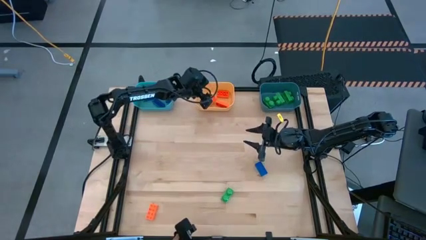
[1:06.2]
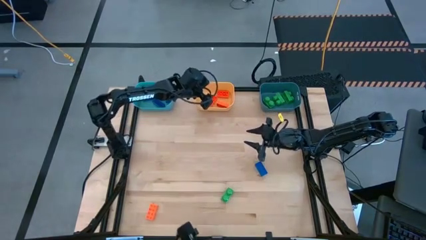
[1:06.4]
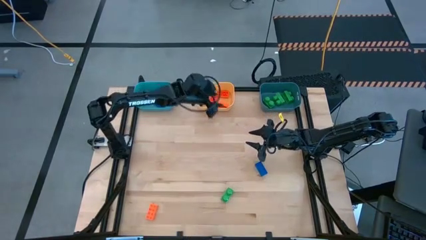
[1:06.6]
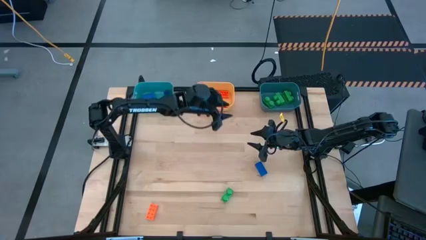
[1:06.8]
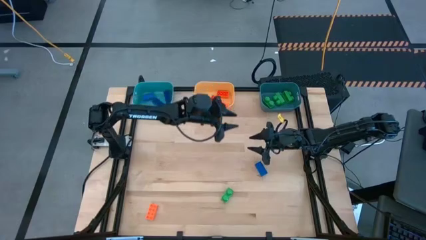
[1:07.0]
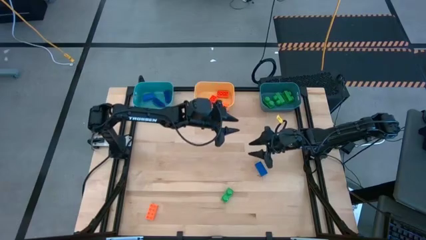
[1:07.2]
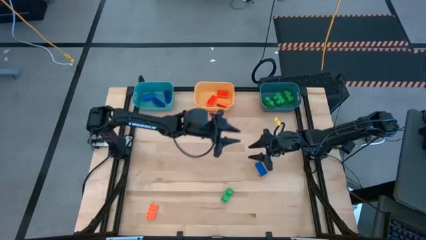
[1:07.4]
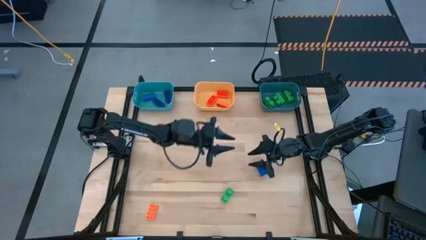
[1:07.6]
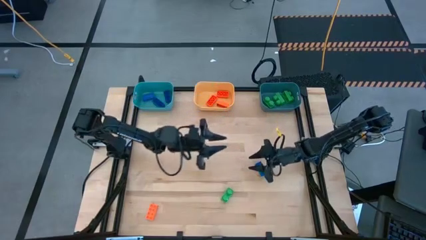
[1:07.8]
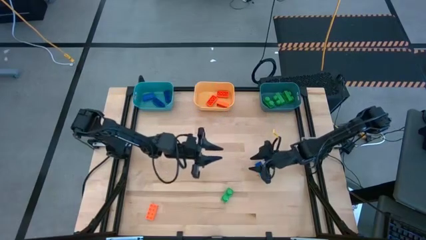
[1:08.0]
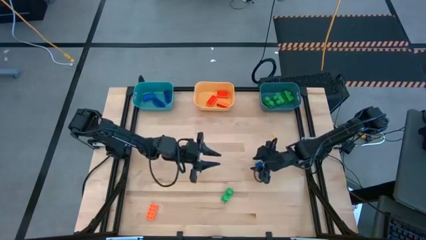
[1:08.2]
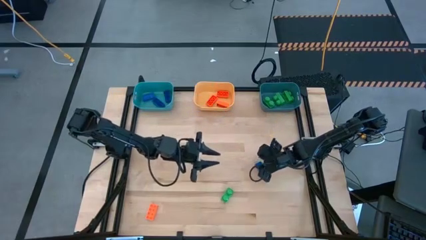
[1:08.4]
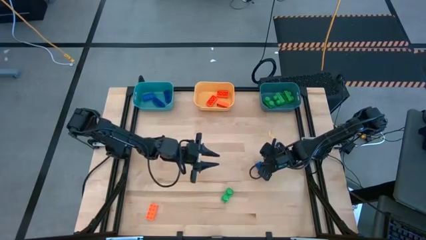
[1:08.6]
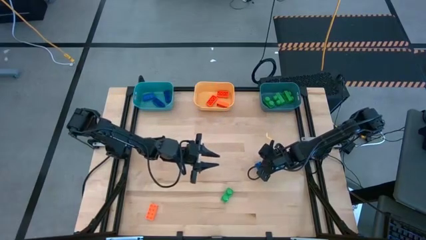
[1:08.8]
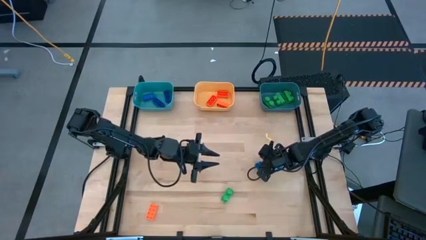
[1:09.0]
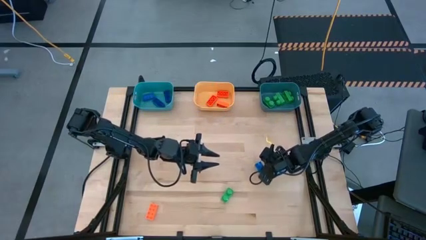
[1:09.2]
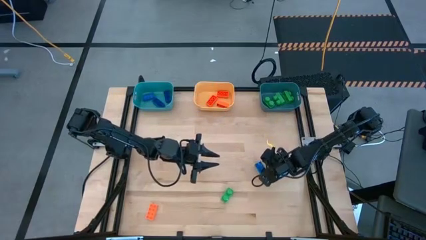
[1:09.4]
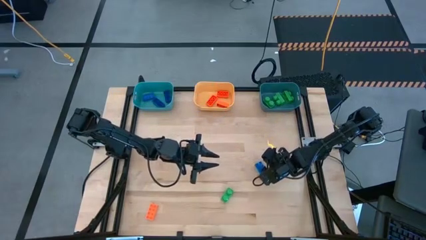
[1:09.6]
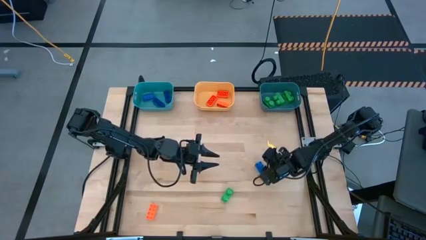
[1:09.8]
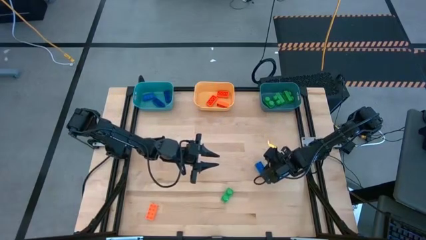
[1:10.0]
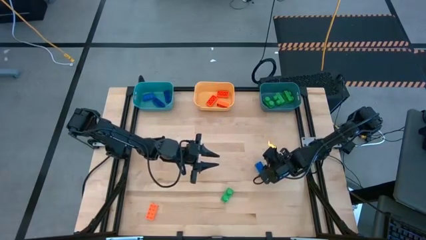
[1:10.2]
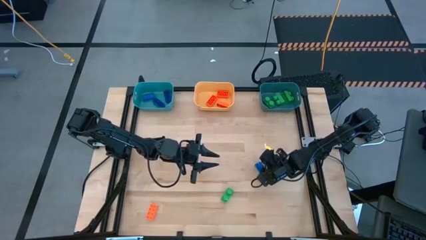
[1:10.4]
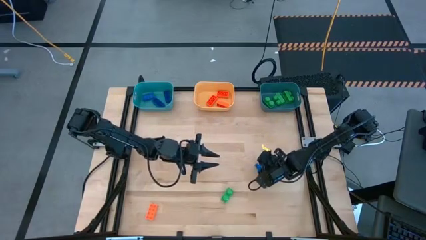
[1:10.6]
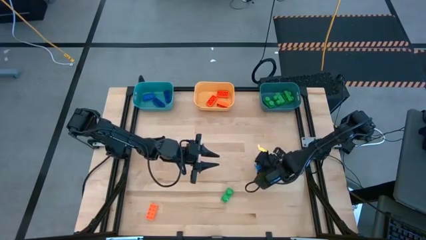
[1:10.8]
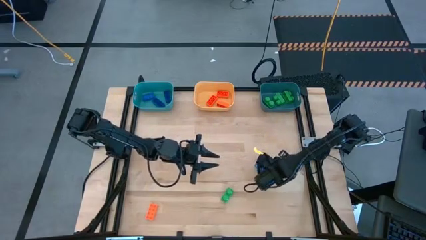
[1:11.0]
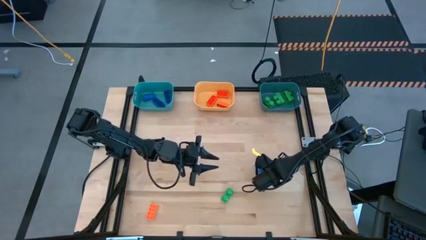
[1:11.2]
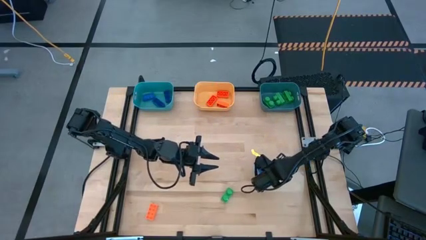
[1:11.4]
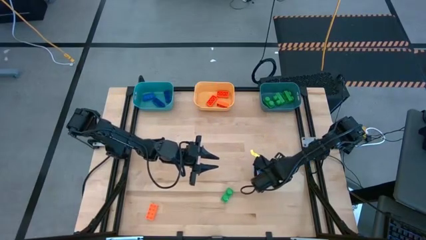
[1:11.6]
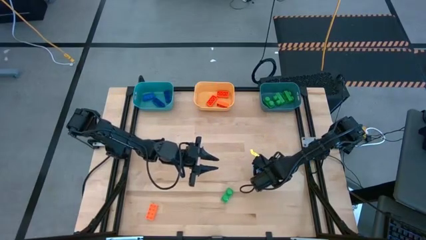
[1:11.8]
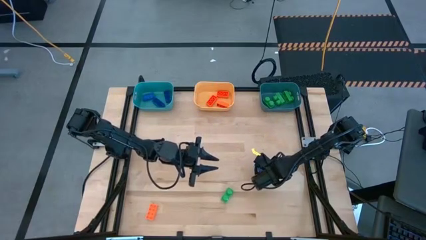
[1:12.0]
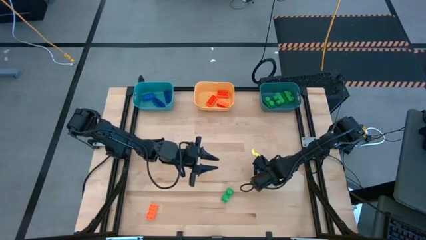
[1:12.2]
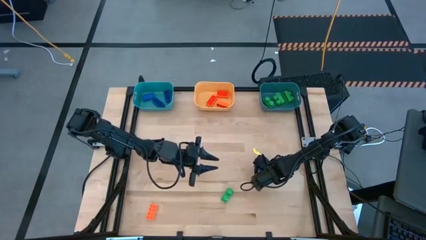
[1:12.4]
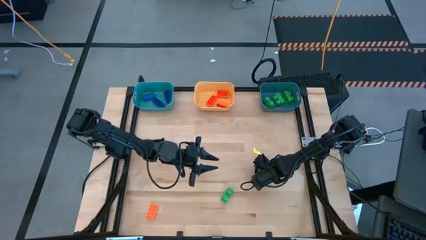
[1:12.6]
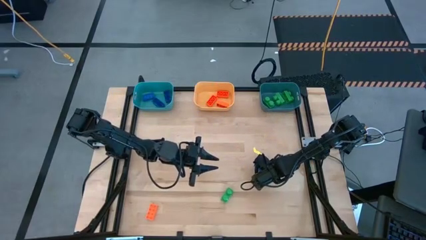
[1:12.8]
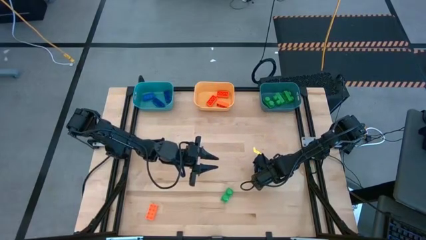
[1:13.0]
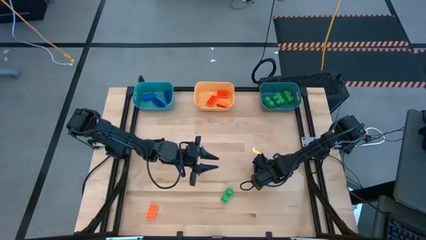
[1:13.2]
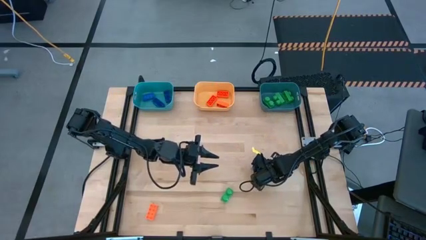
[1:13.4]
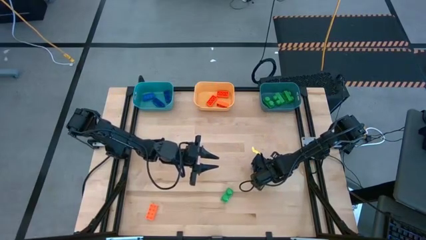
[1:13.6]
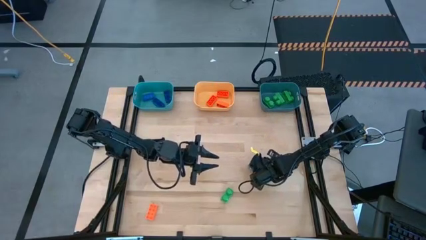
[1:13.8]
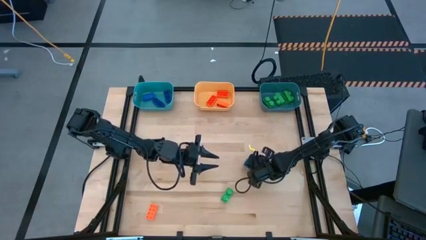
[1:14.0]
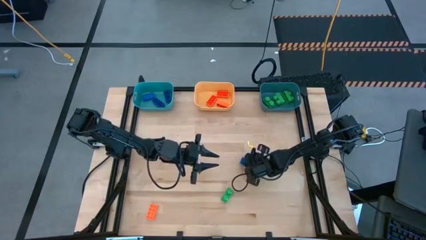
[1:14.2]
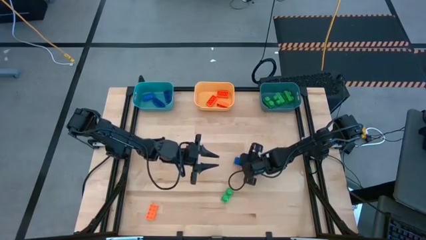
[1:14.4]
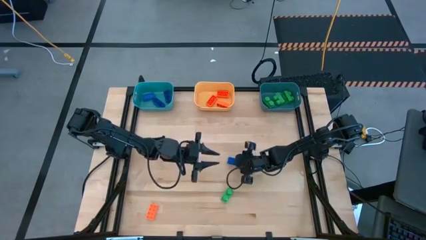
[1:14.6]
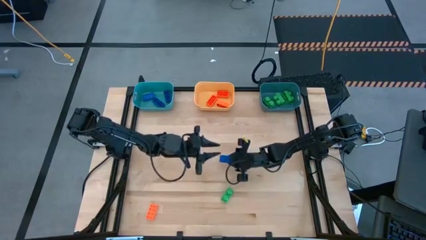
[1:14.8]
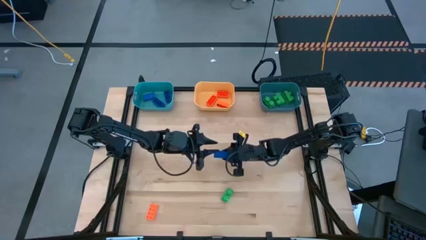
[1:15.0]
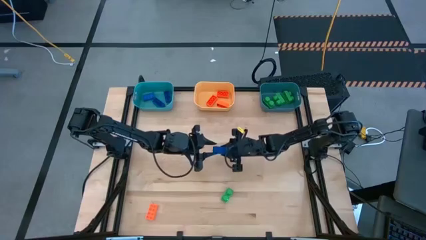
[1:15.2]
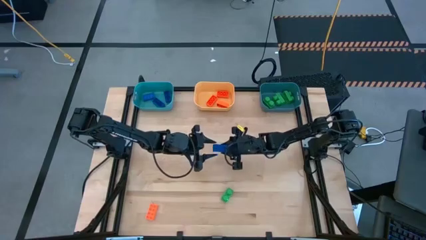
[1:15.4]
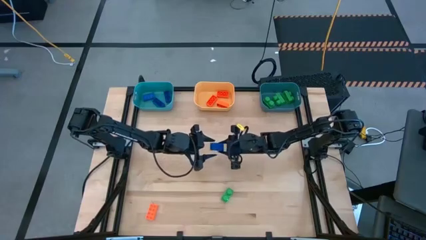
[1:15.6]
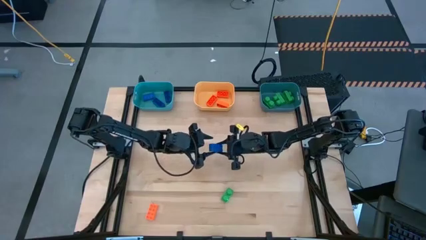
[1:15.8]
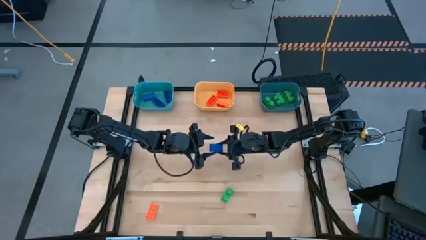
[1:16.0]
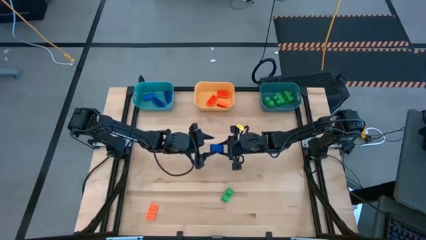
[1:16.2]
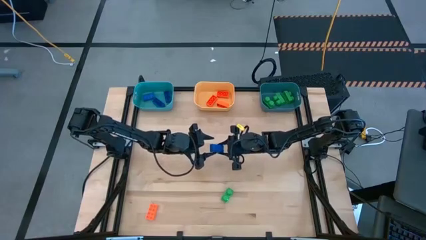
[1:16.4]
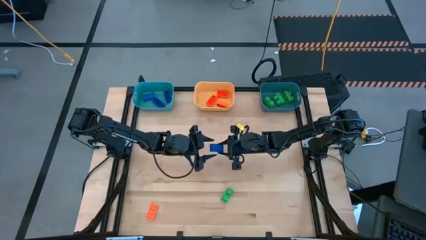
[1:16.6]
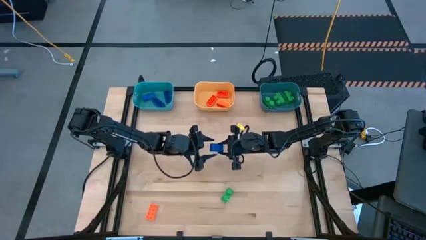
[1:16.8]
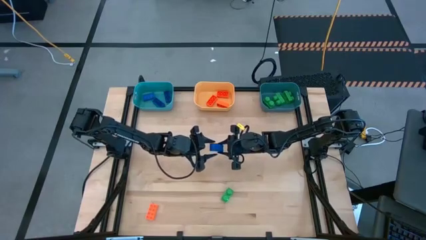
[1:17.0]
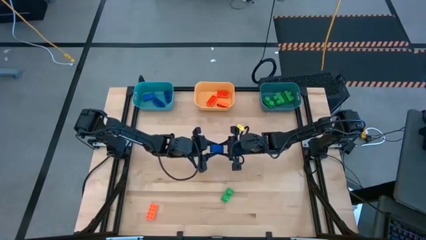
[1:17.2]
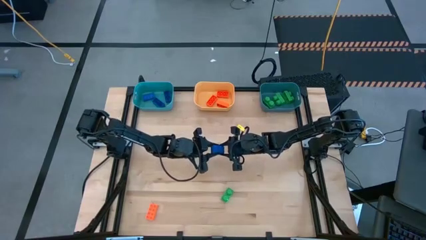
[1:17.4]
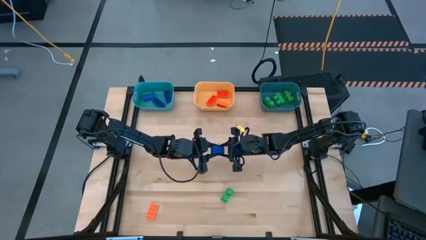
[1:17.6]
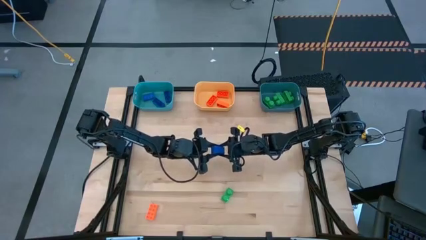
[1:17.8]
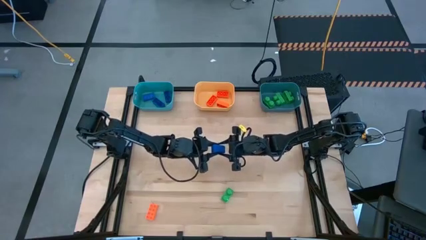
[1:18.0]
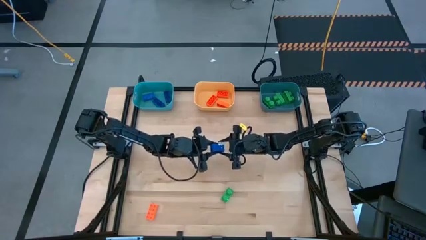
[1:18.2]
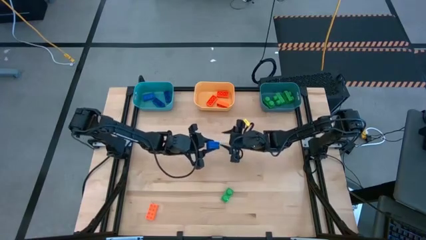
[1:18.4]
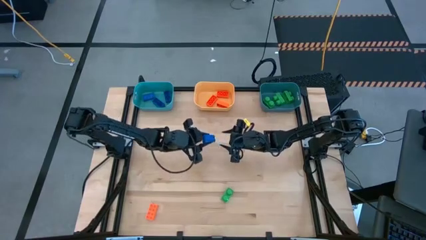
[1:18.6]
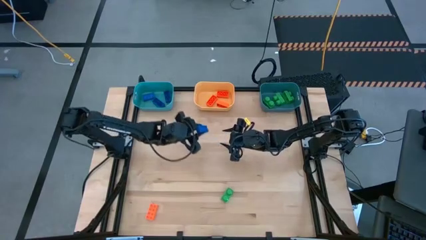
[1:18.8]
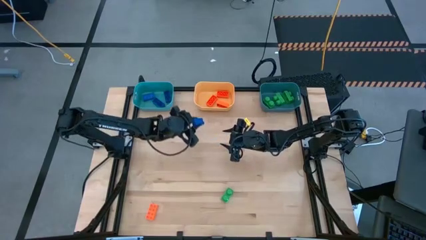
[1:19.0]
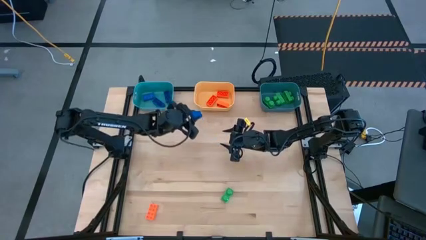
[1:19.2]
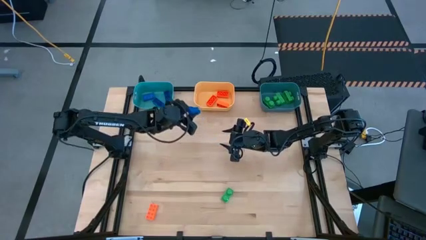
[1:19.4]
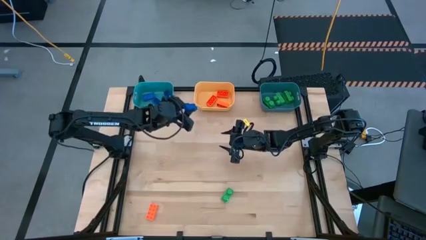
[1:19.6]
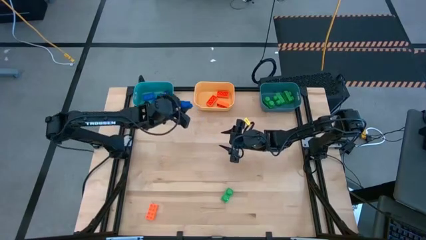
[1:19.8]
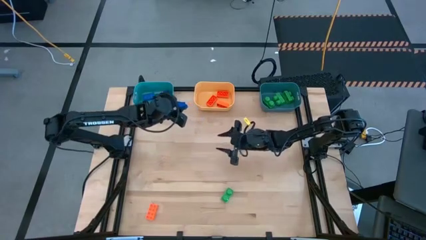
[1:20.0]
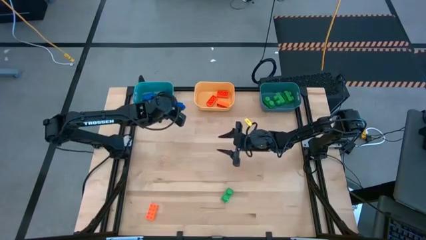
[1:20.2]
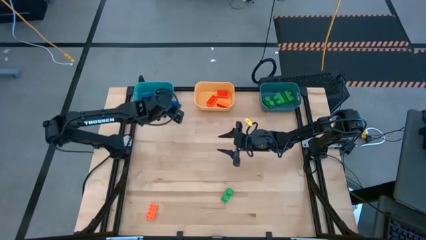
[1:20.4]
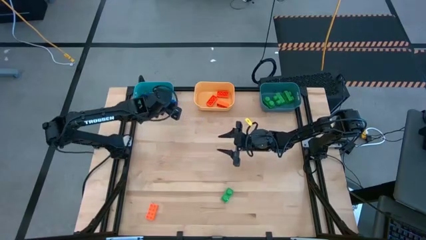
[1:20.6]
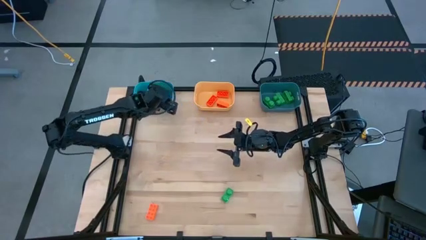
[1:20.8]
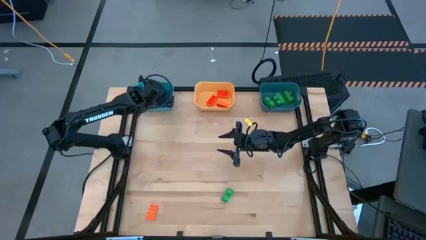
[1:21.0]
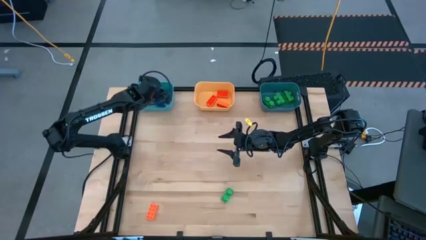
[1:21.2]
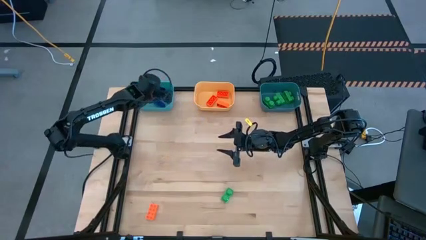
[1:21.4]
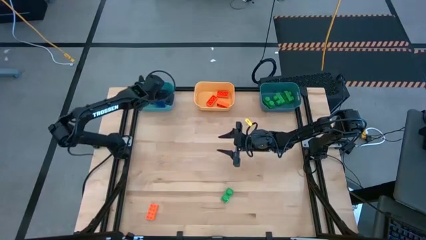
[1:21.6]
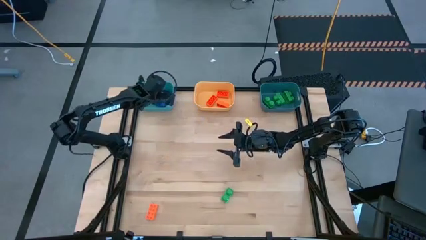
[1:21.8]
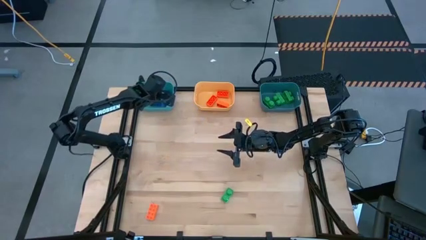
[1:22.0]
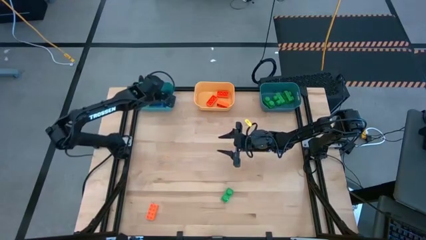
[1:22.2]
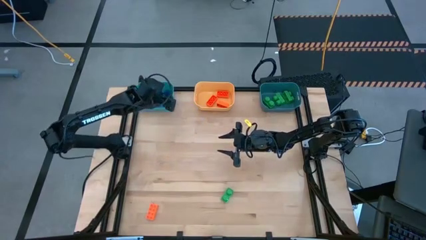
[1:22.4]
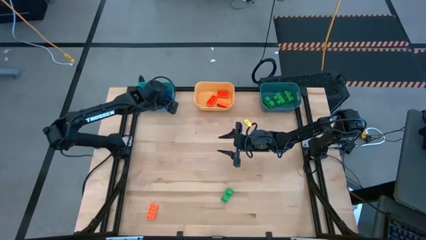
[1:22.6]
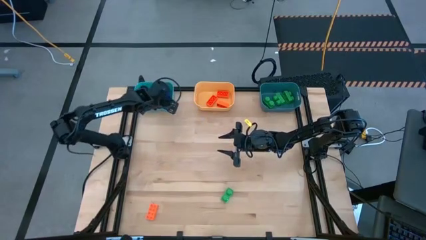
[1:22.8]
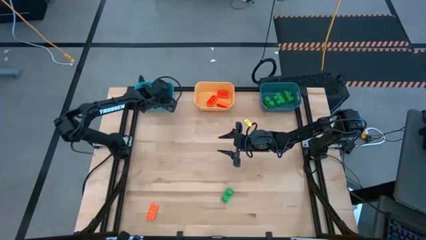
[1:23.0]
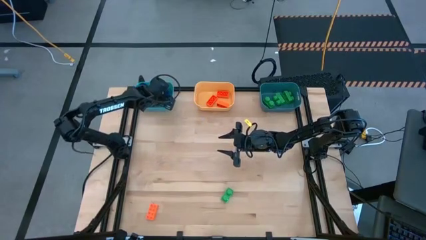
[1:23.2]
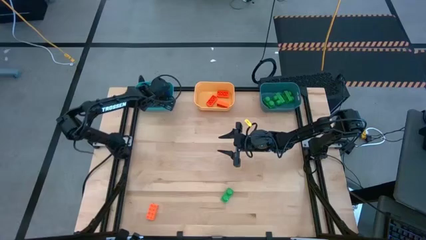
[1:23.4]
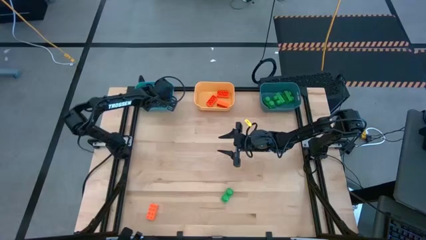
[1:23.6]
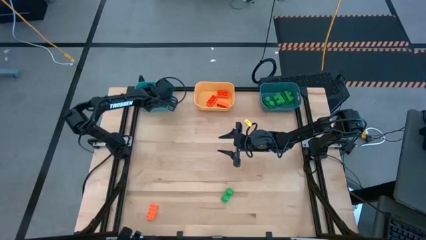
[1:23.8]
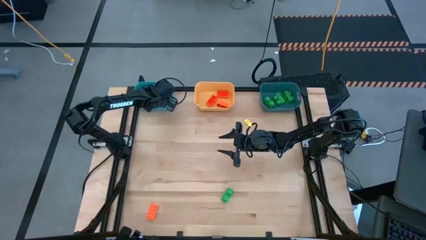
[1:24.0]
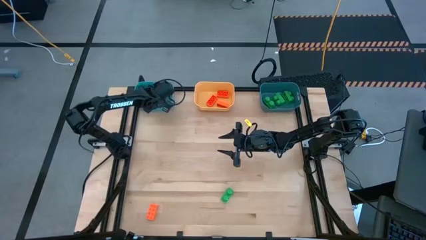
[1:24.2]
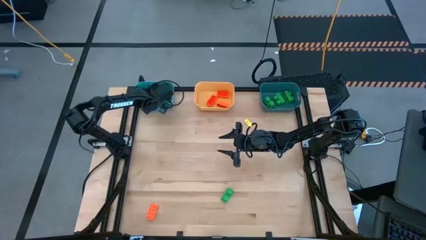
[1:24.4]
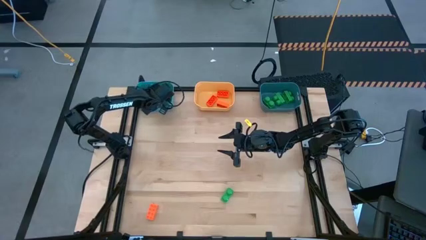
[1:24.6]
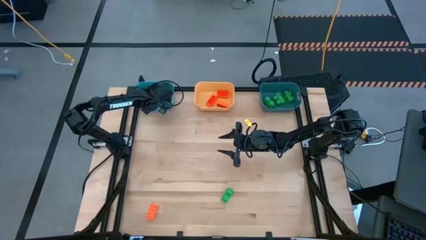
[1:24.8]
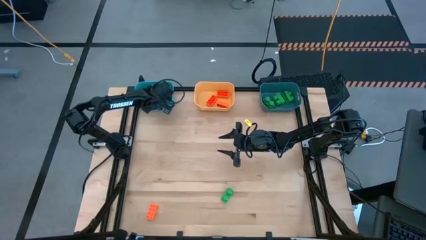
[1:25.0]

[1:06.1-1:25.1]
Task: Sort & place blocks by color
Put the blue game piece into the blue bin
